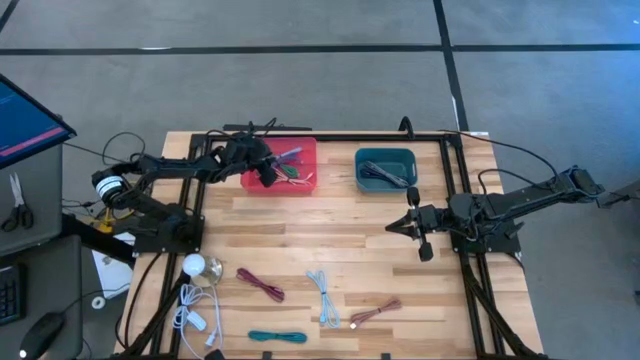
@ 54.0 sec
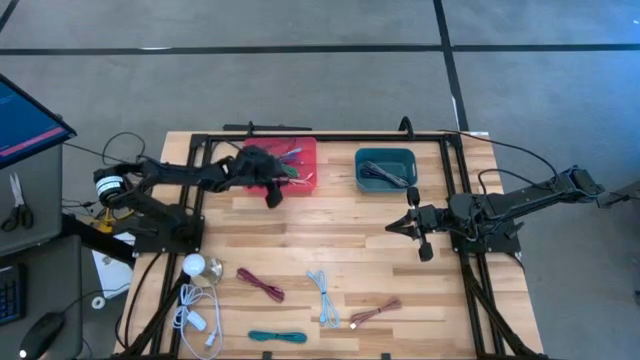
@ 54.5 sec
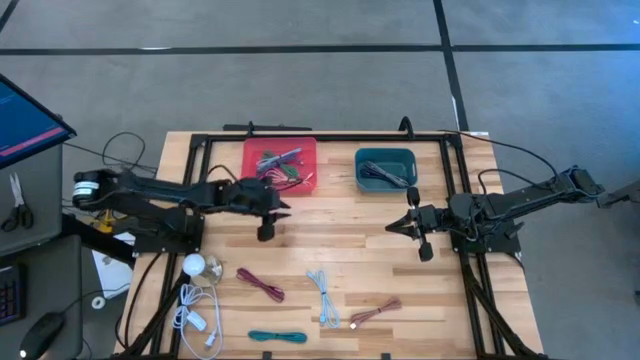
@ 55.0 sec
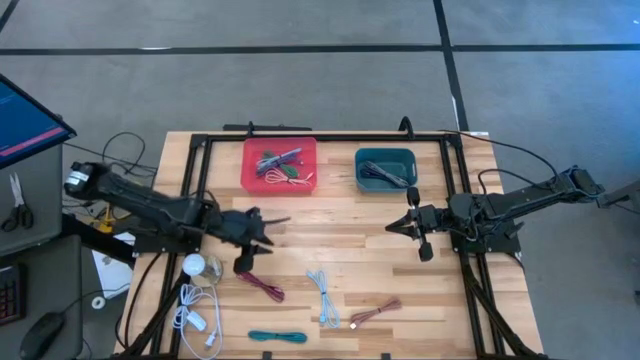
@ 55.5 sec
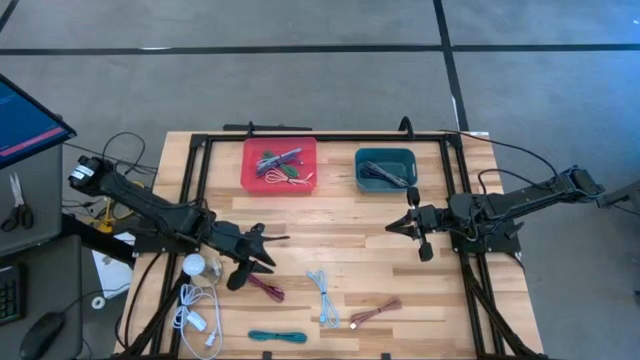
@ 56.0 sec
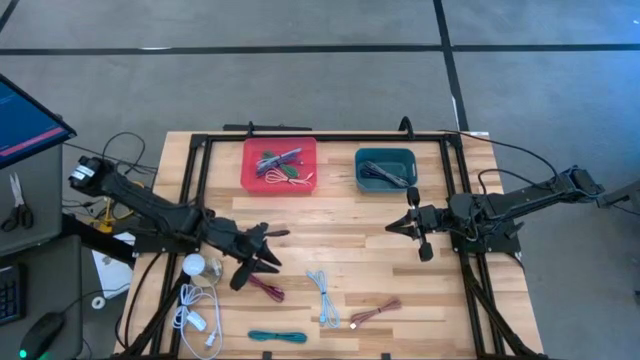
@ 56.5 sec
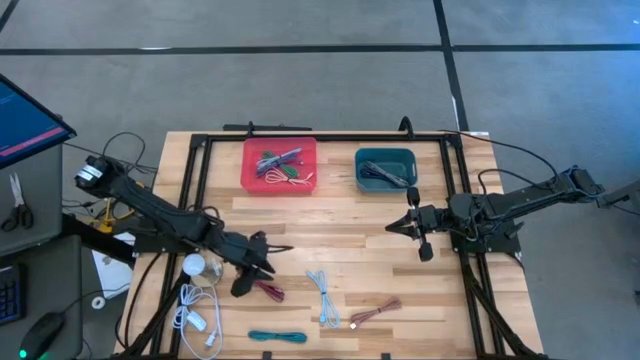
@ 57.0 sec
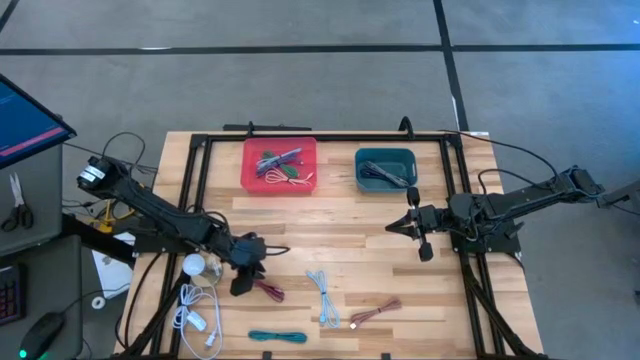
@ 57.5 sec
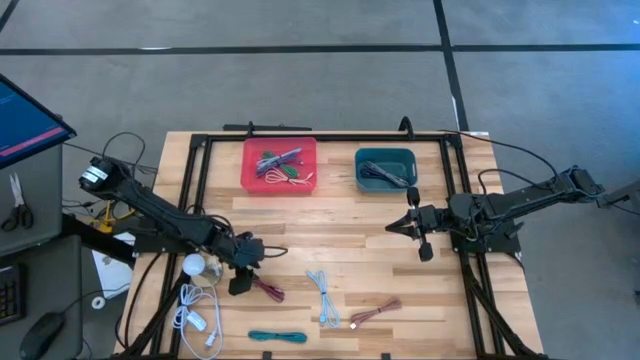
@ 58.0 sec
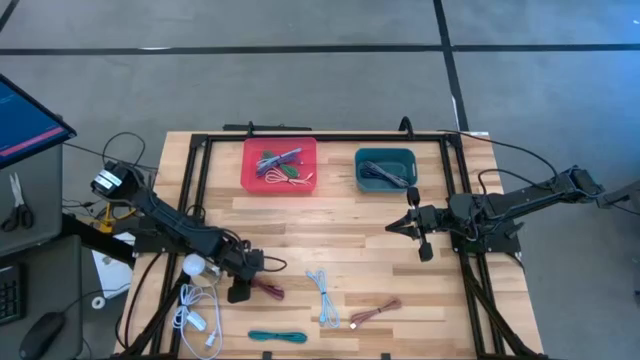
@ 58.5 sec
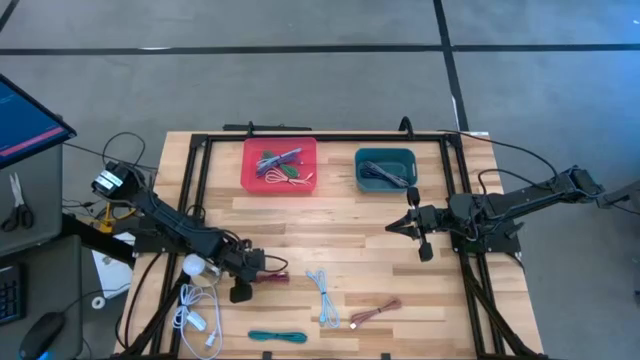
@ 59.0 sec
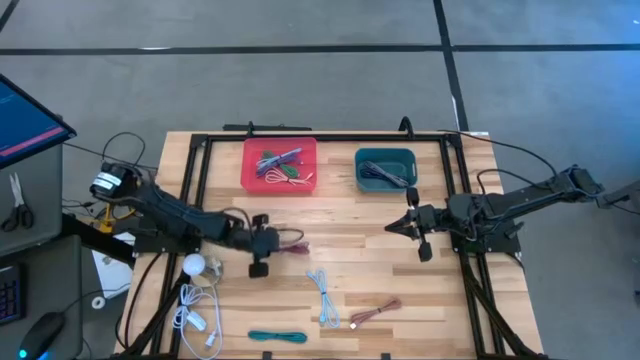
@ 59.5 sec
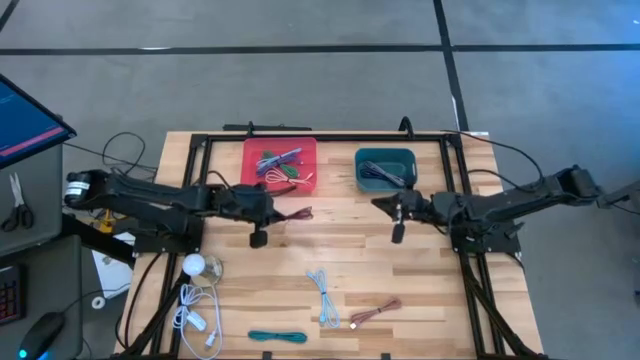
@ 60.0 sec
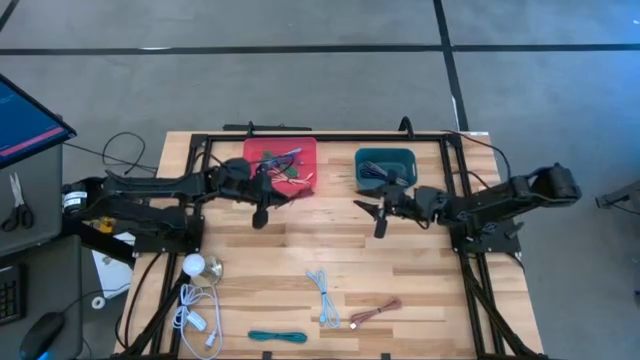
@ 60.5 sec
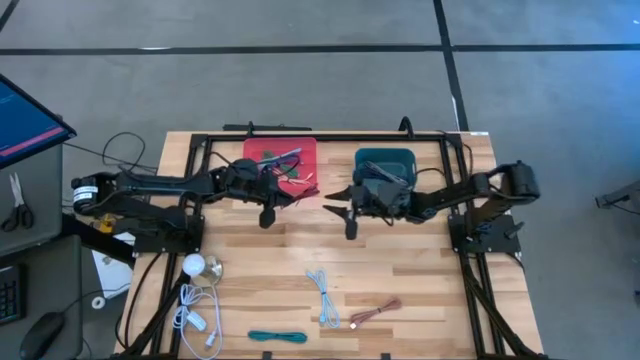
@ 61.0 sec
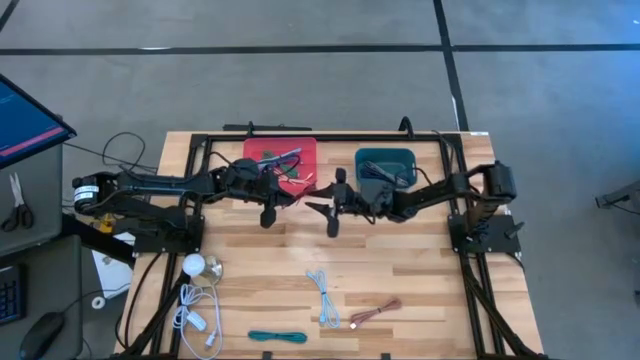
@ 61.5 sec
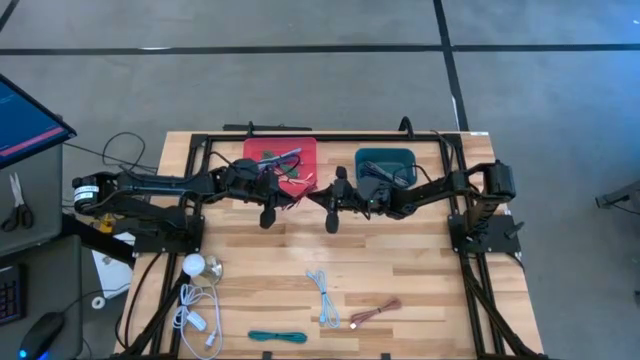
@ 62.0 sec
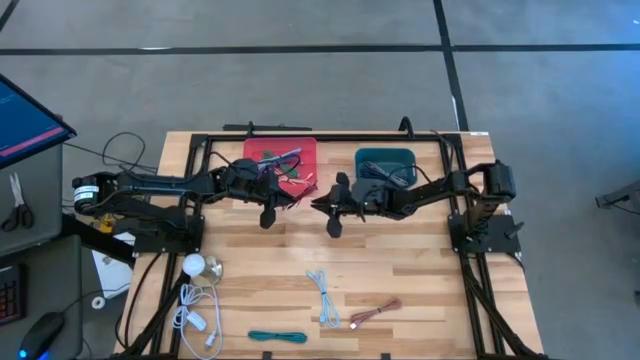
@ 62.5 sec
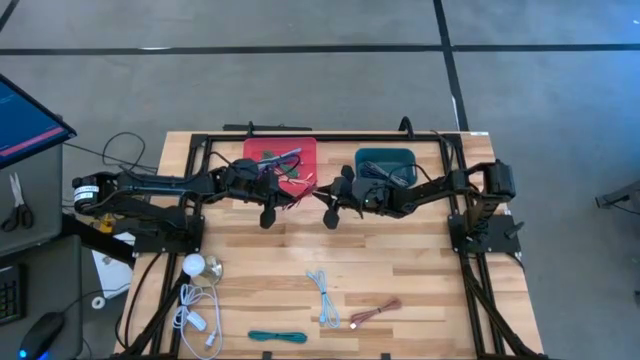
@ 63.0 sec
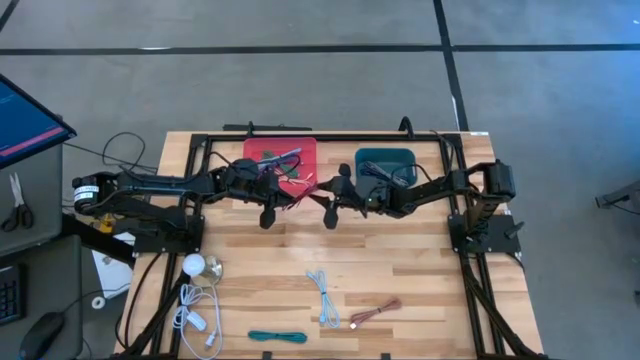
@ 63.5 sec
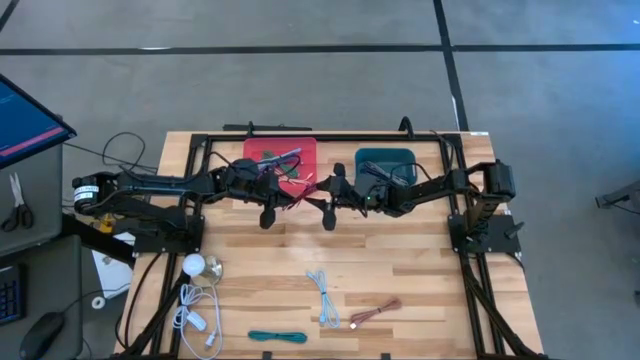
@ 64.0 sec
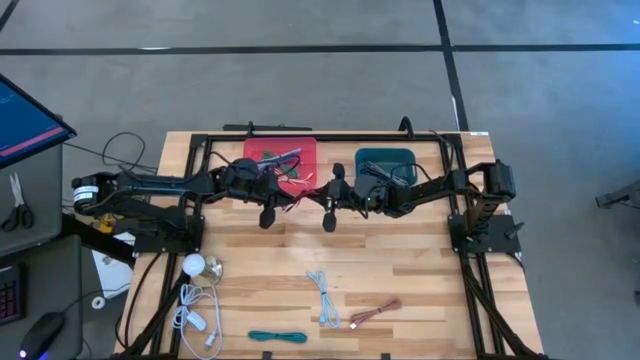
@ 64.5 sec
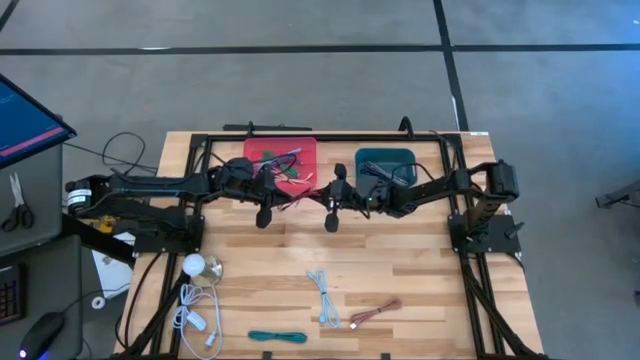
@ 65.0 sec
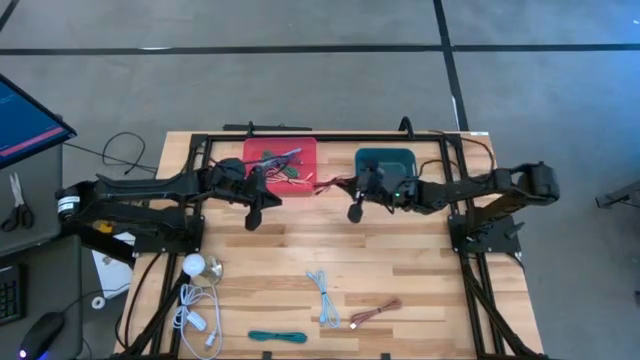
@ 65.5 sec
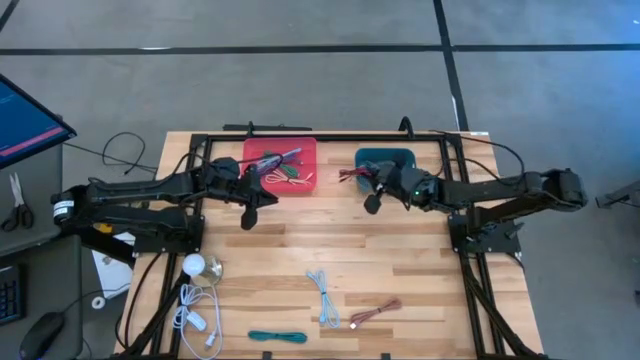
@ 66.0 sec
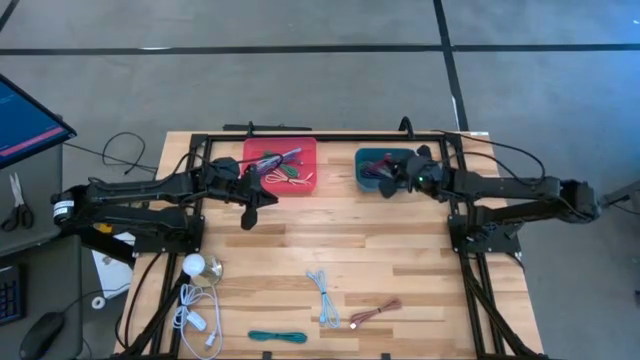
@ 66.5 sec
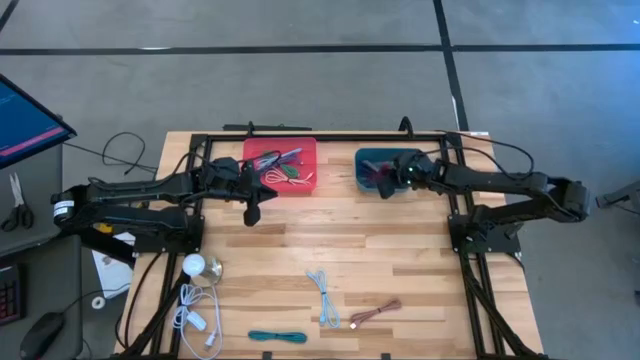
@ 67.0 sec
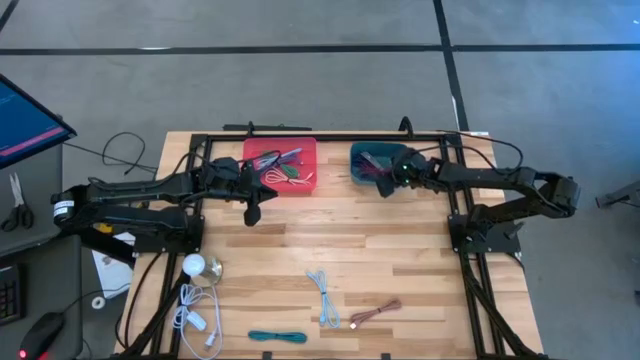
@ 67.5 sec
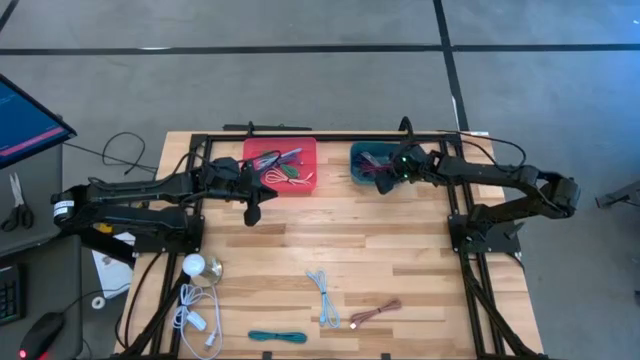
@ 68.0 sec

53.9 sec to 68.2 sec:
Task: Pick & Place USB Port
Put the black and pink charger cable into the green bin

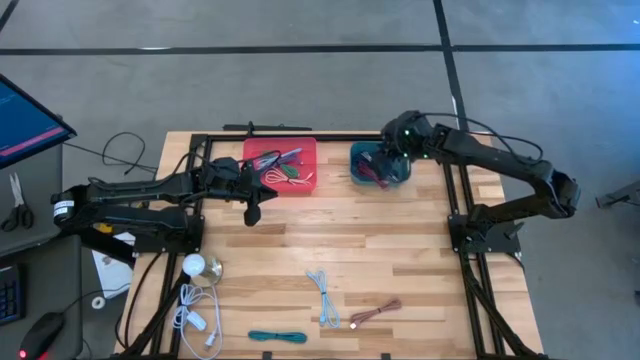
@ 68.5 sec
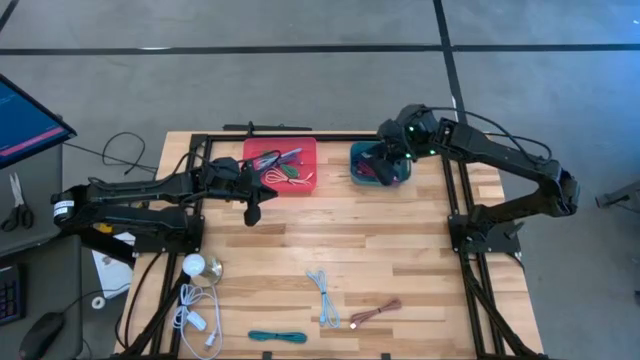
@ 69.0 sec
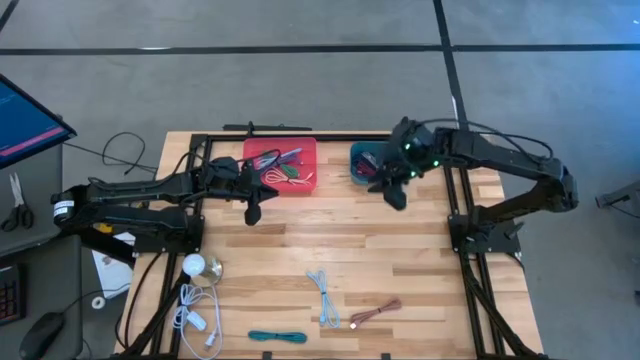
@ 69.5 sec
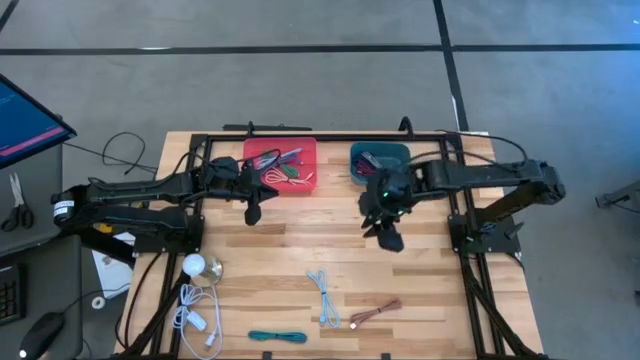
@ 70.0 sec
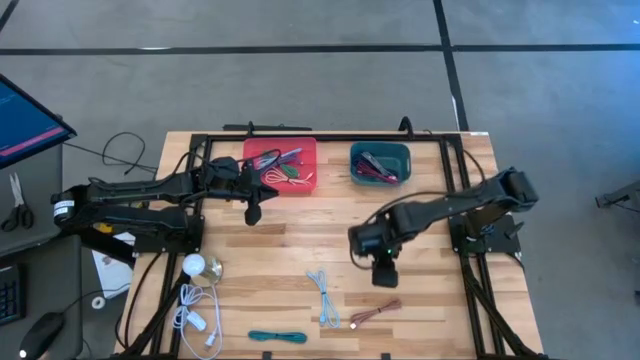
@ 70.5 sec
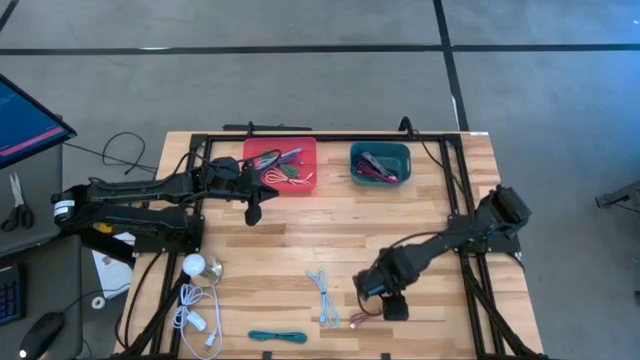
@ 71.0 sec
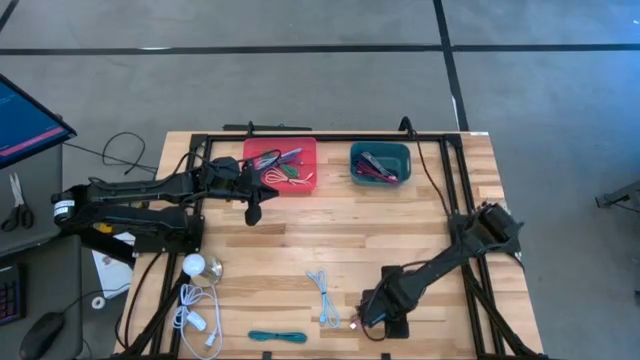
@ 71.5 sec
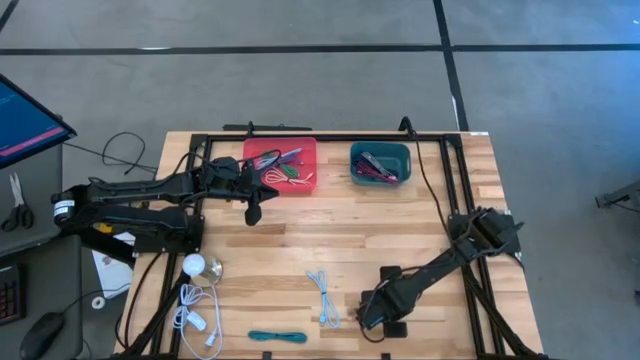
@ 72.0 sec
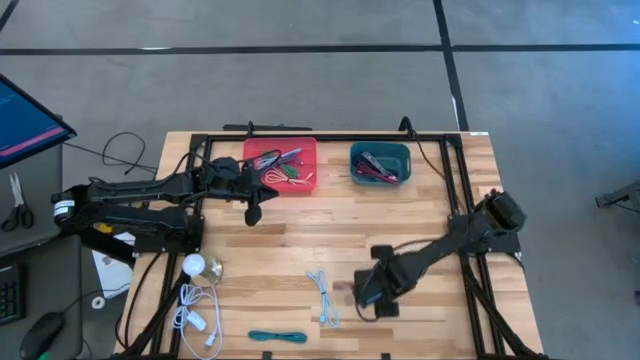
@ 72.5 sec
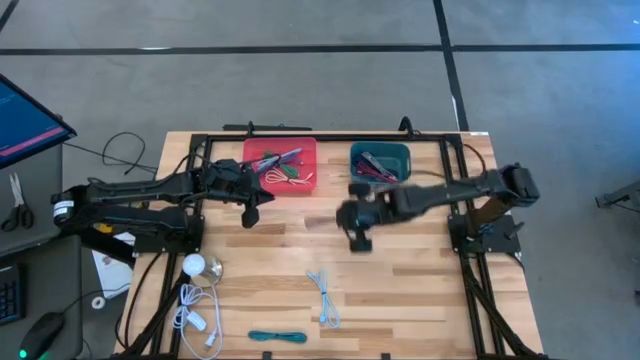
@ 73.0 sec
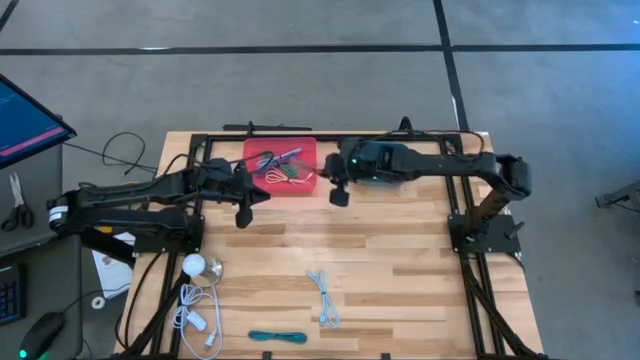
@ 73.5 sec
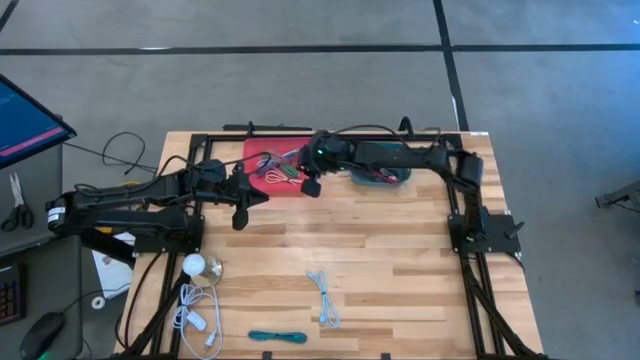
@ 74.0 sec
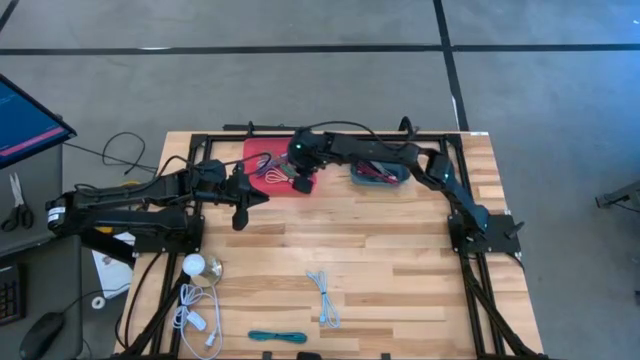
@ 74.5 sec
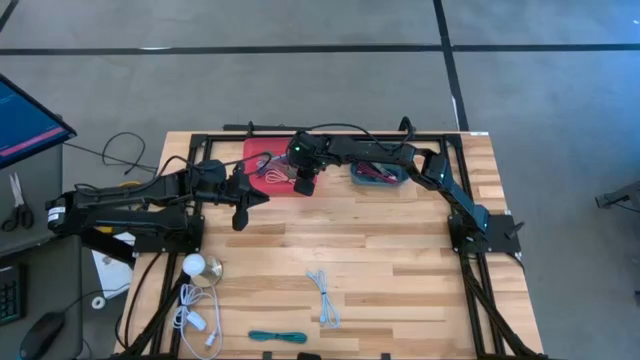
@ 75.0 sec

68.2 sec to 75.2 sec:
Put the brown charger cable into the red bin
